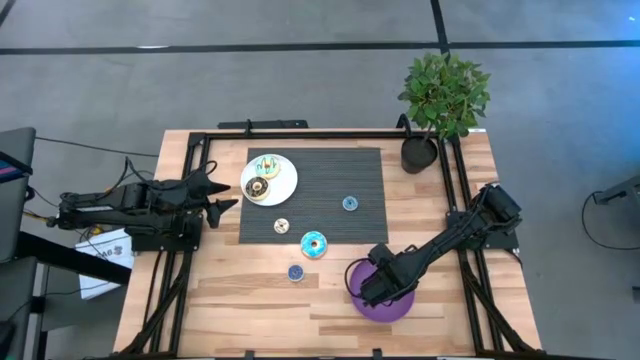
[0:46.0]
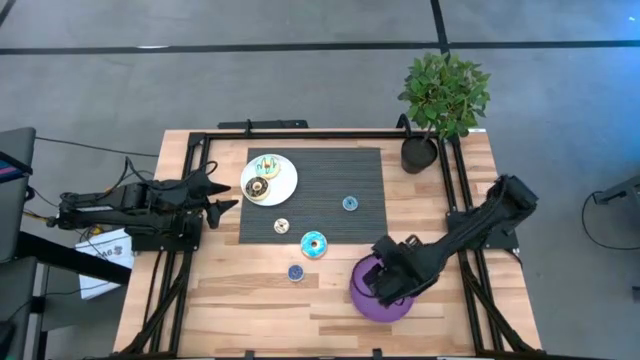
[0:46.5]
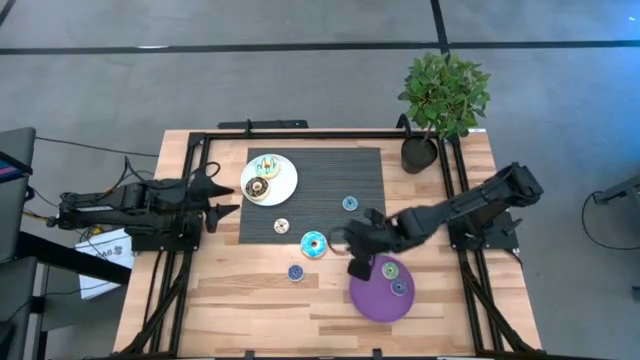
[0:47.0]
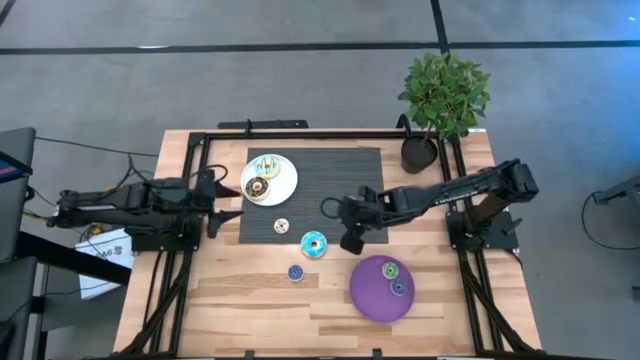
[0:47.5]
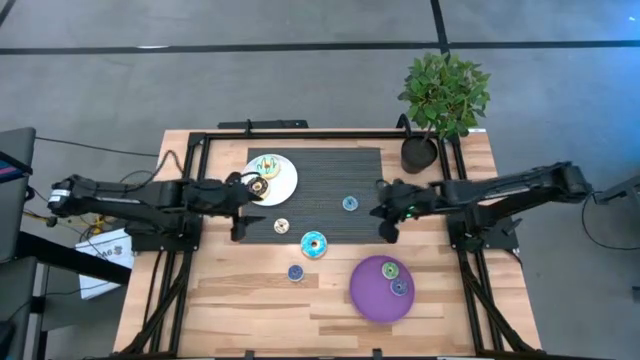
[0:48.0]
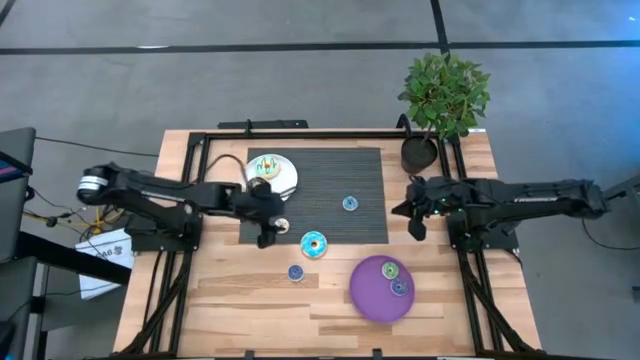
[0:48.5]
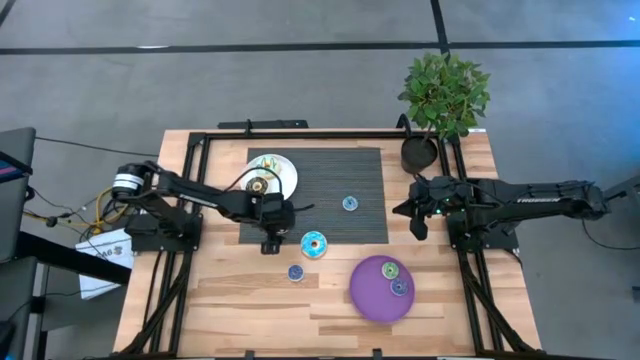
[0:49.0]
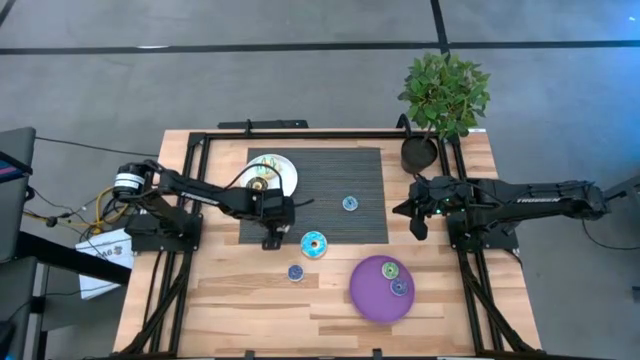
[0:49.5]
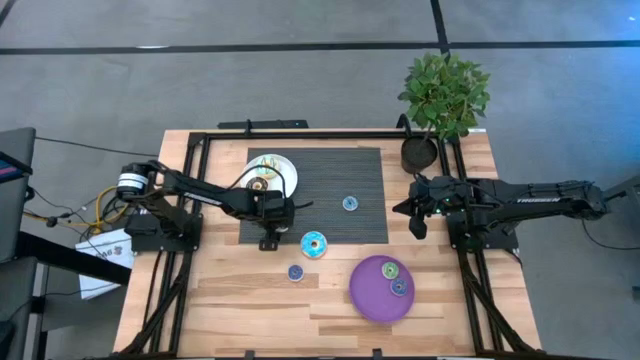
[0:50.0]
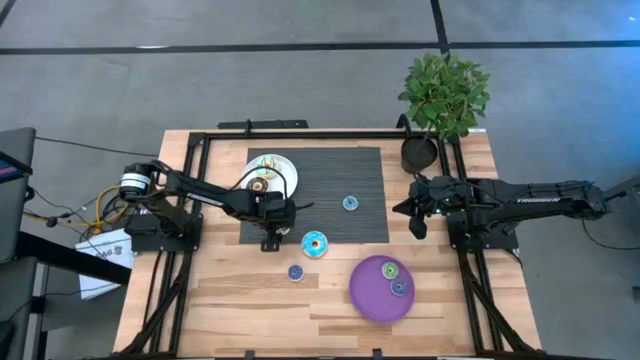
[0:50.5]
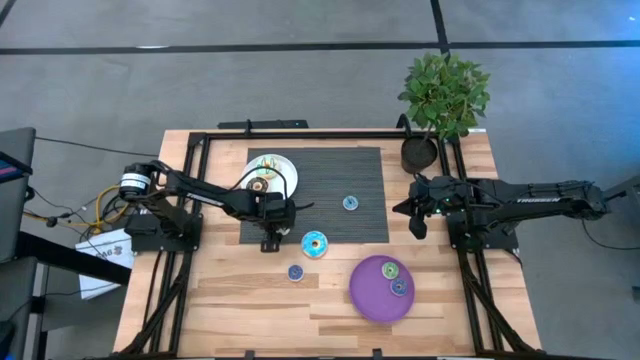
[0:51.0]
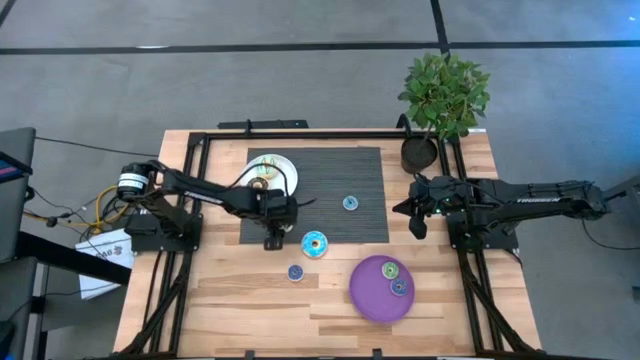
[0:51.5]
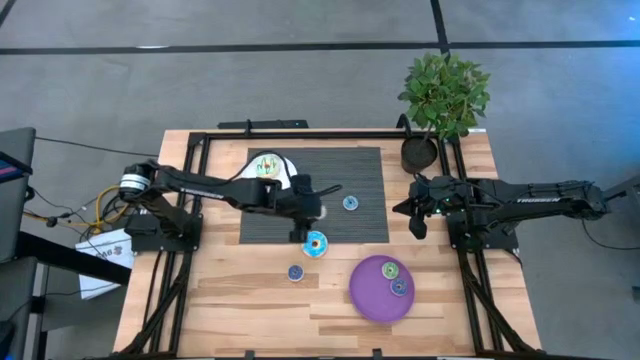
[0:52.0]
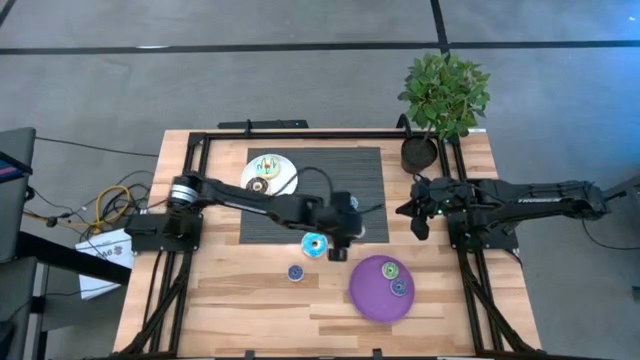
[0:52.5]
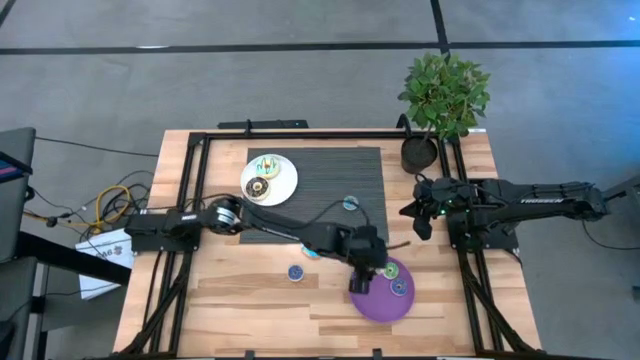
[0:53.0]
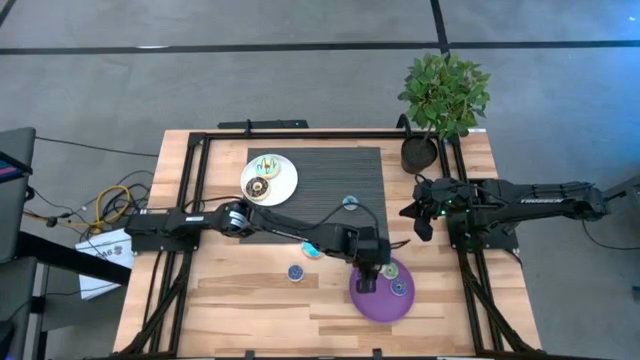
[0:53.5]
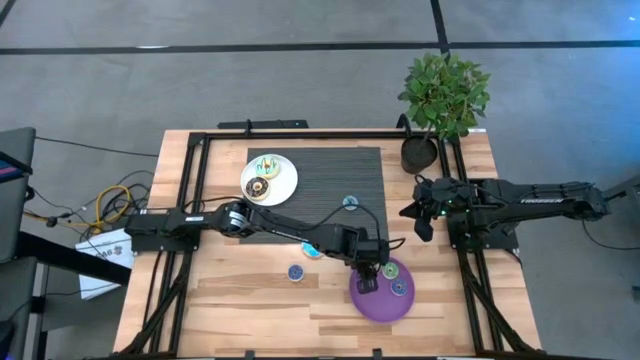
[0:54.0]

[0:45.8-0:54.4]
Task: Pick & Place donuts
Put the small white donut on the purple plate

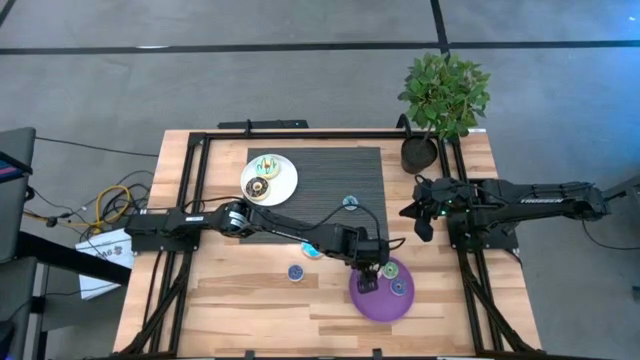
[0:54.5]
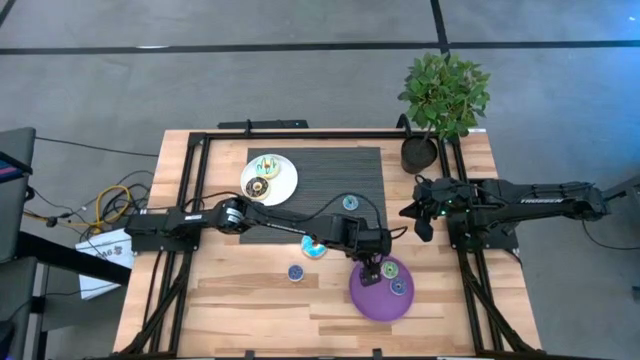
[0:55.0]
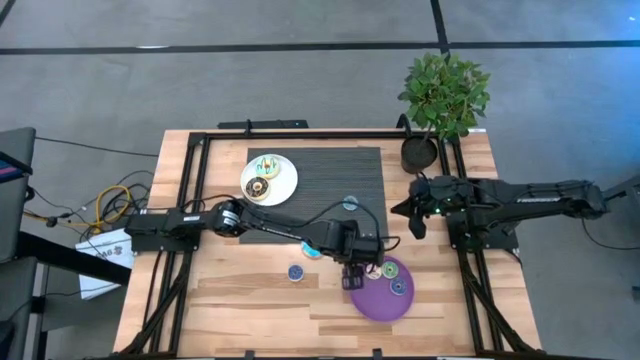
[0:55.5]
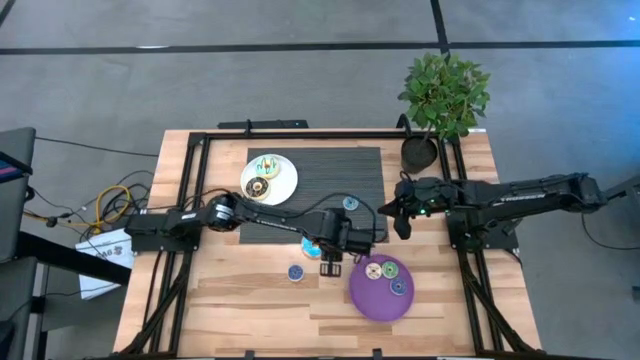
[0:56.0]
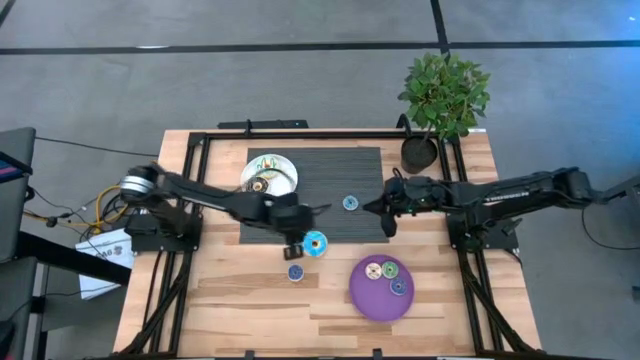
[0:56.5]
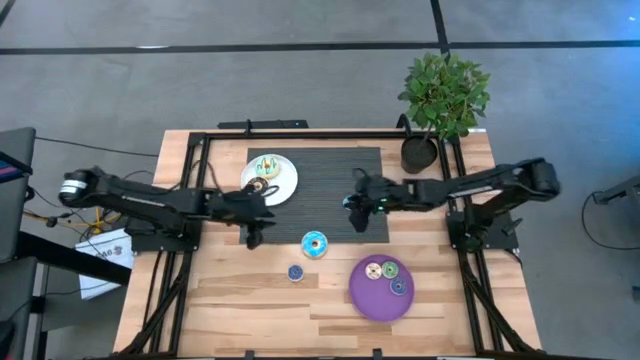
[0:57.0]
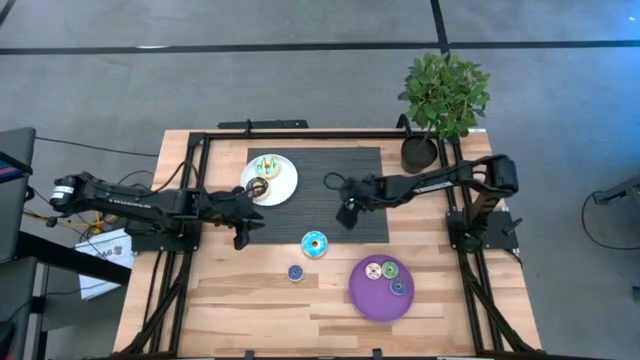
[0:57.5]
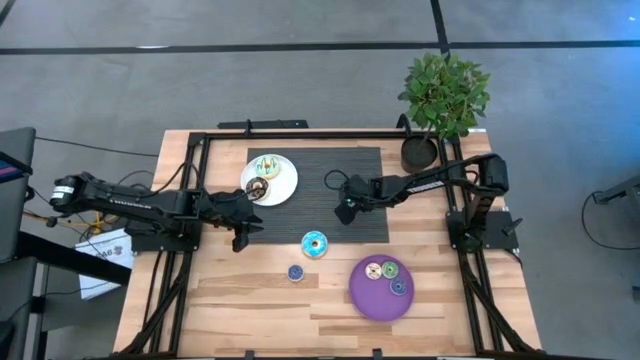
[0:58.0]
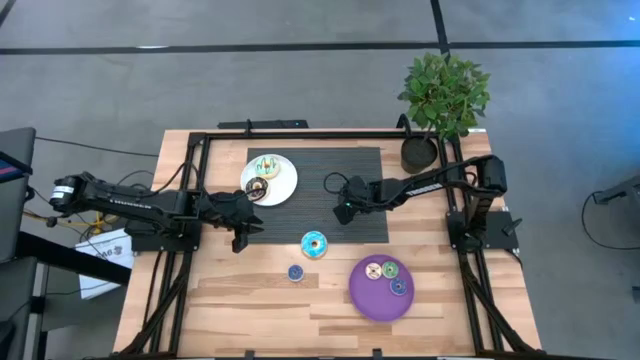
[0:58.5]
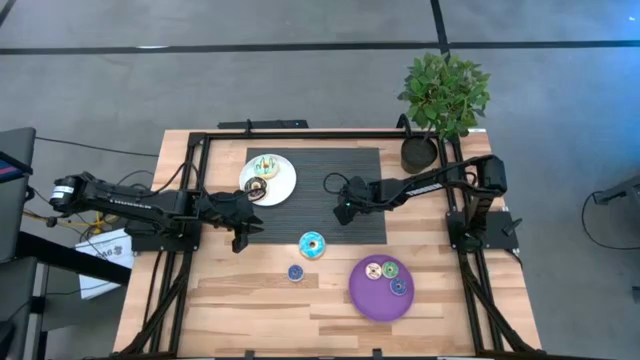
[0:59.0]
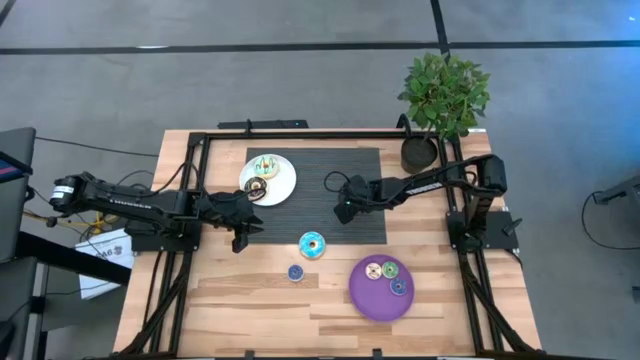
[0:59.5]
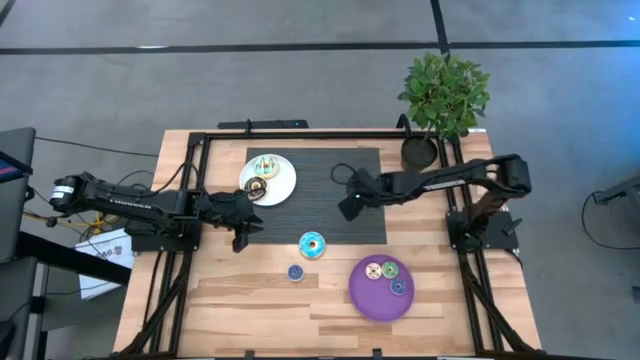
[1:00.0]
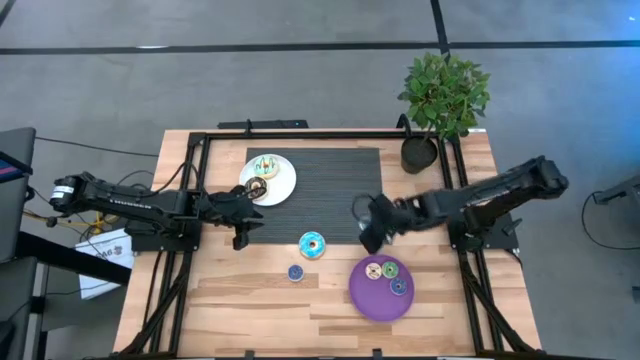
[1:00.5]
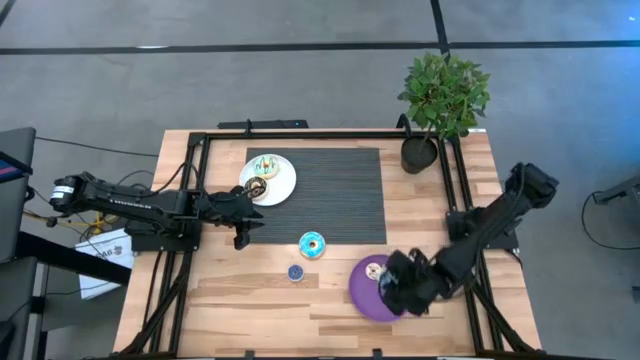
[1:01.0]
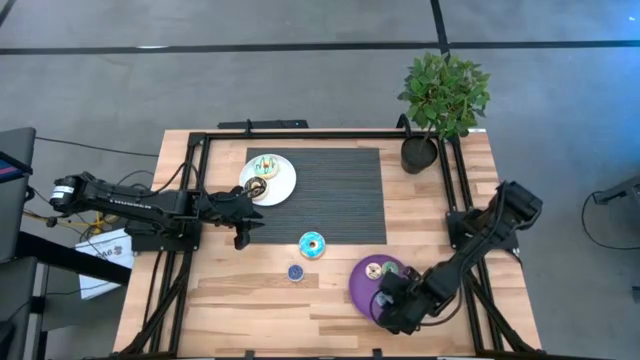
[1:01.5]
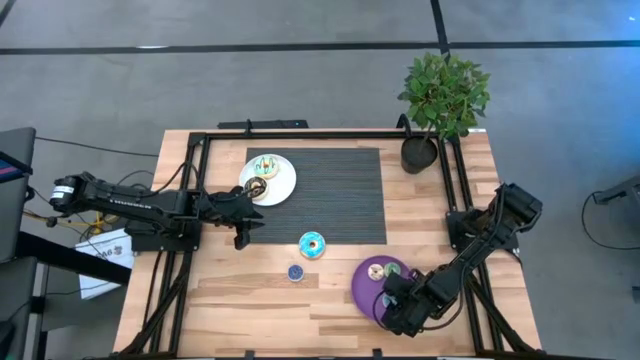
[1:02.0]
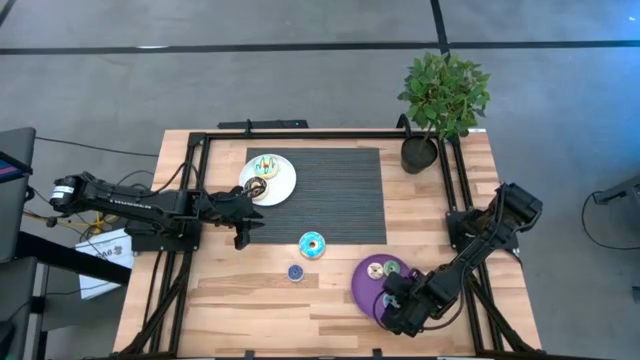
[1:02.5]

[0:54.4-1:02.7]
Put the small light blue donut on the purple plate

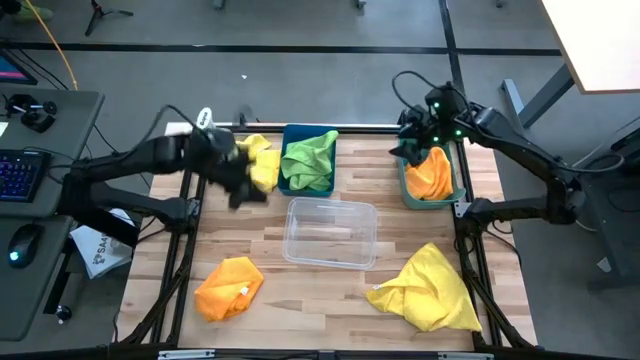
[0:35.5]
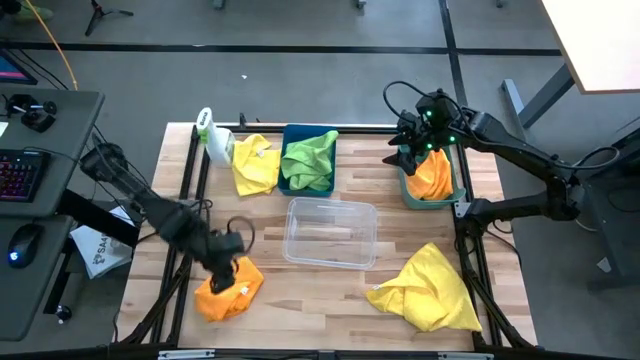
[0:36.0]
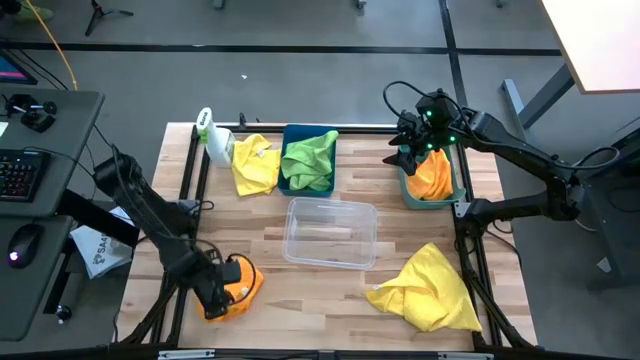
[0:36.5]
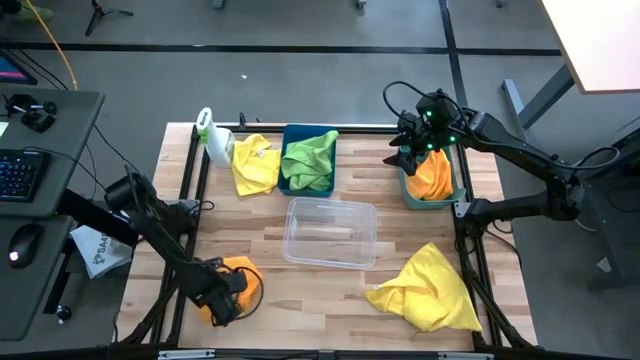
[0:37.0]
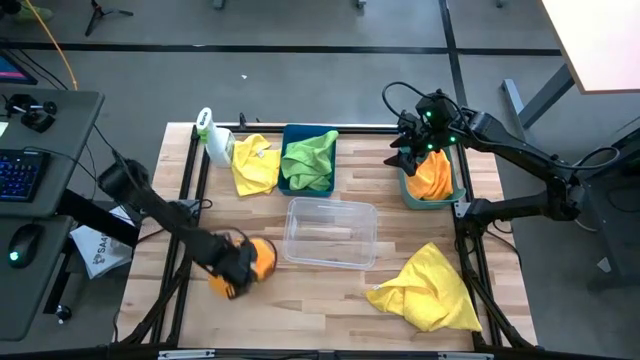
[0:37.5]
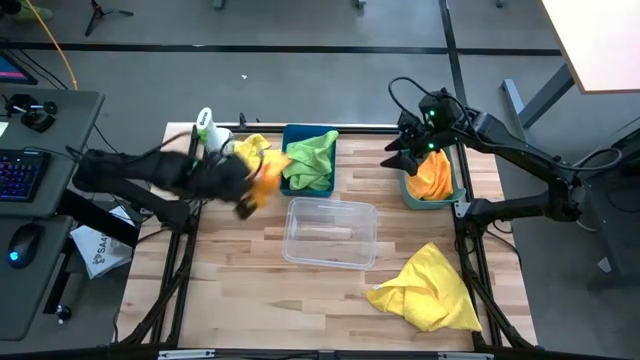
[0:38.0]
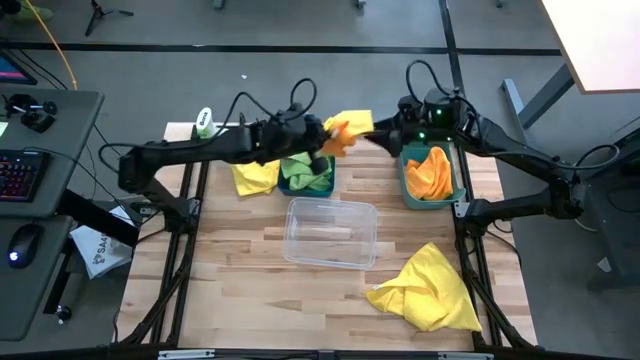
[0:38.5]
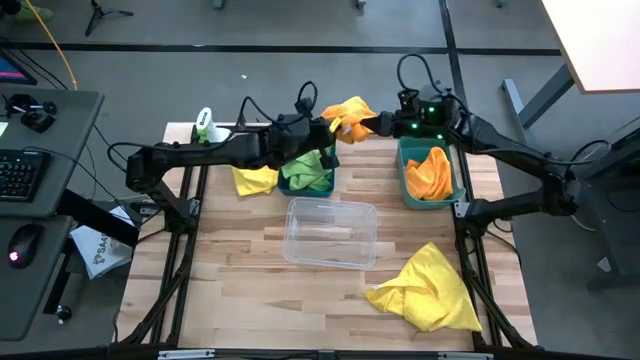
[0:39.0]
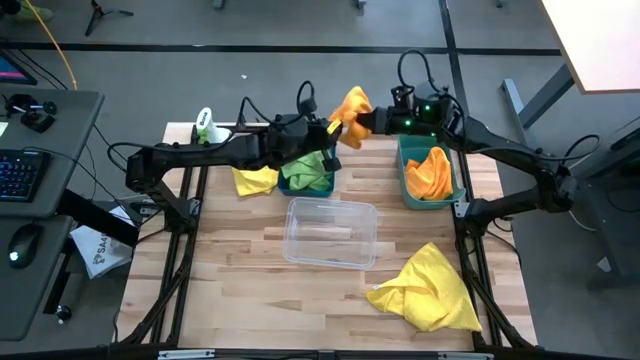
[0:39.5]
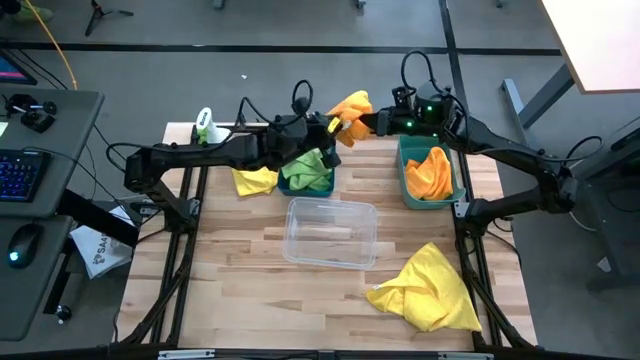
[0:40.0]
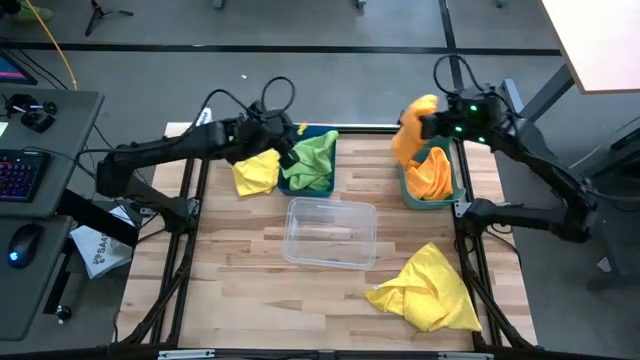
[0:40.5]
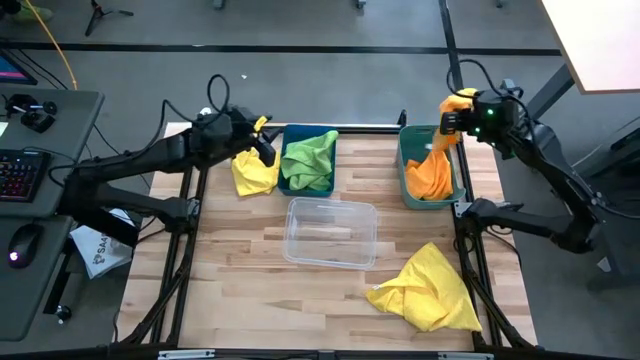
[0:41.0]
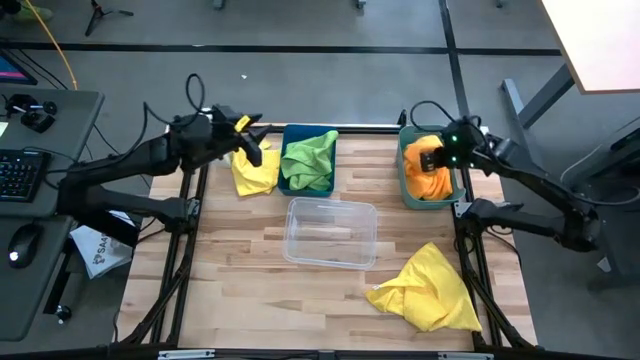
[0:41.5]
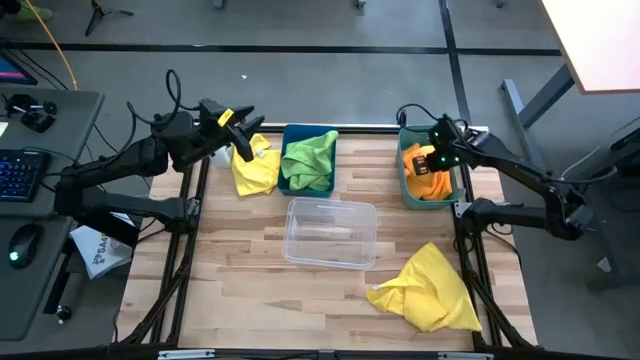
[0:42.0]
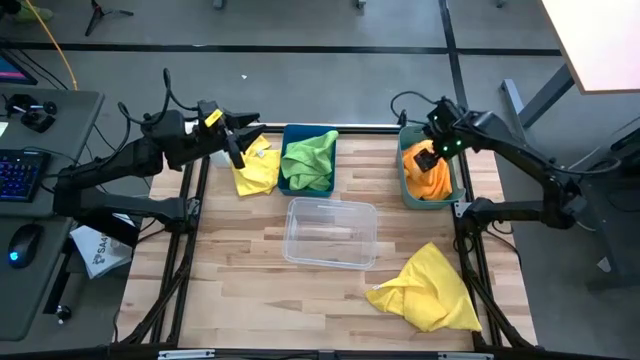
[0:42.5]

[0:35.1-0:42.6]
Task: Sort microfiber towel by color & place in baskets
Put the orange microfiber cloth into the green bin
